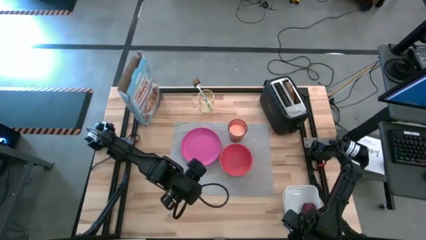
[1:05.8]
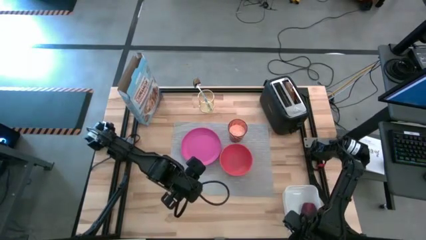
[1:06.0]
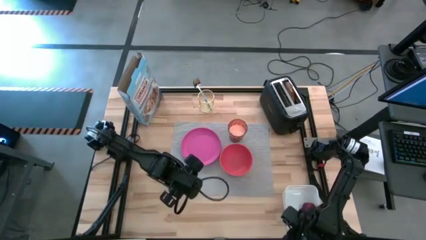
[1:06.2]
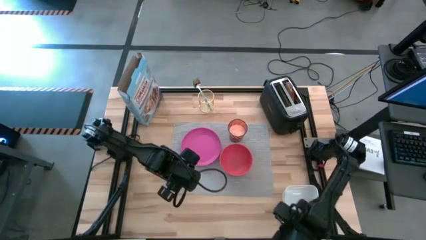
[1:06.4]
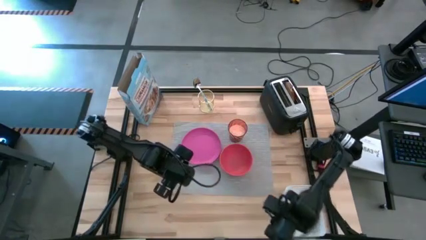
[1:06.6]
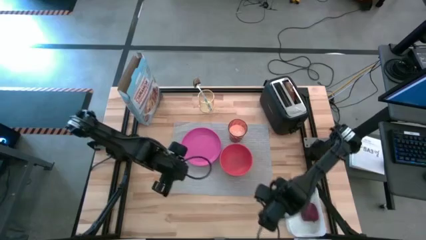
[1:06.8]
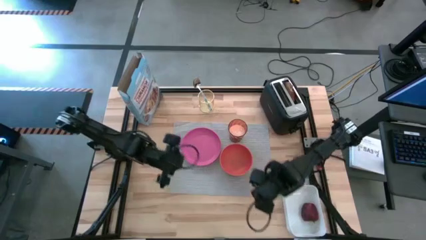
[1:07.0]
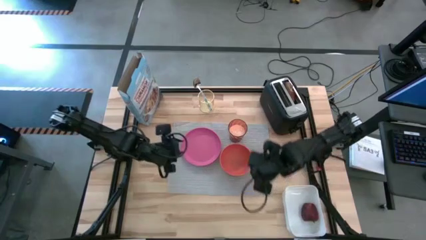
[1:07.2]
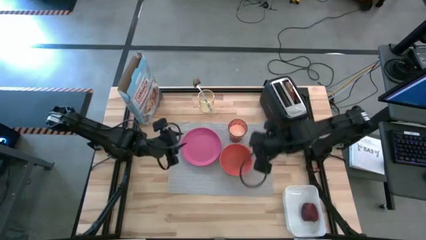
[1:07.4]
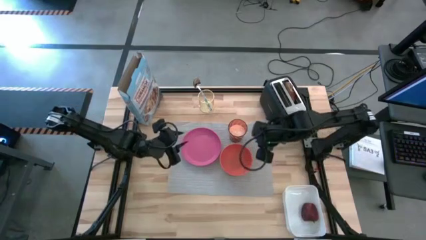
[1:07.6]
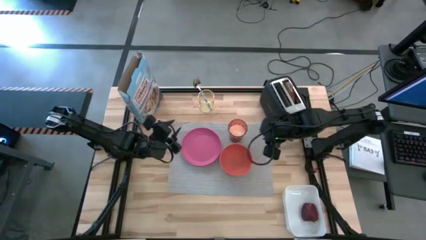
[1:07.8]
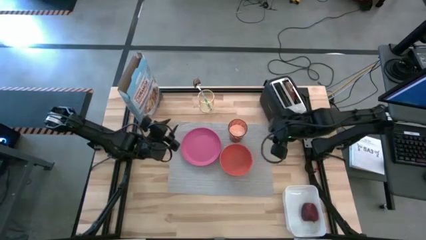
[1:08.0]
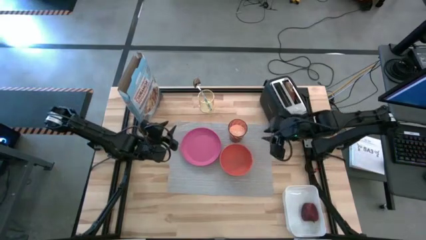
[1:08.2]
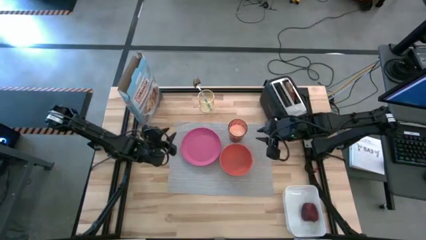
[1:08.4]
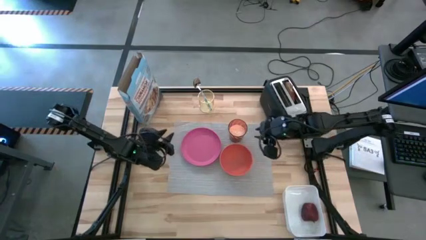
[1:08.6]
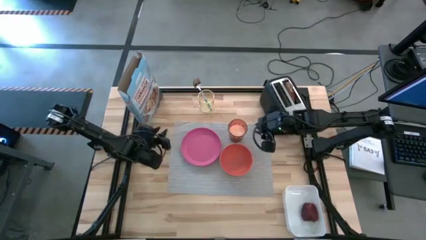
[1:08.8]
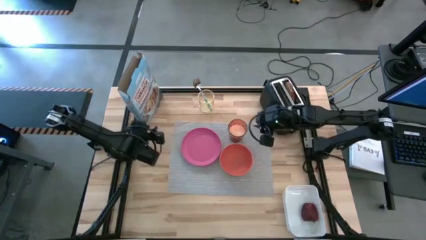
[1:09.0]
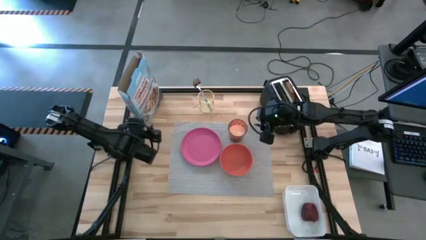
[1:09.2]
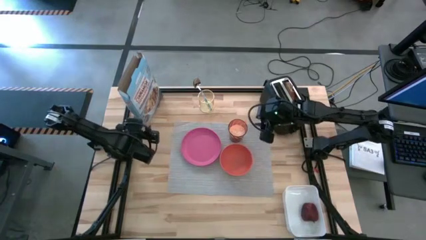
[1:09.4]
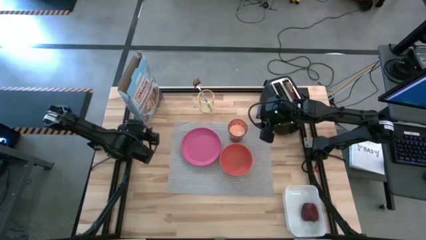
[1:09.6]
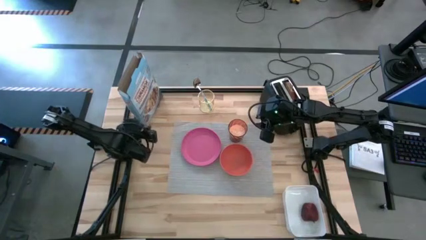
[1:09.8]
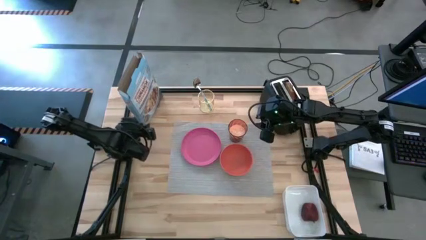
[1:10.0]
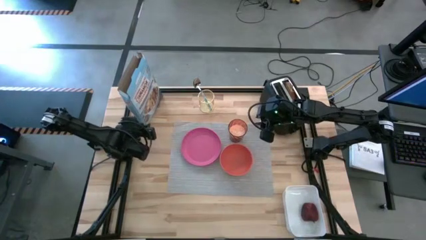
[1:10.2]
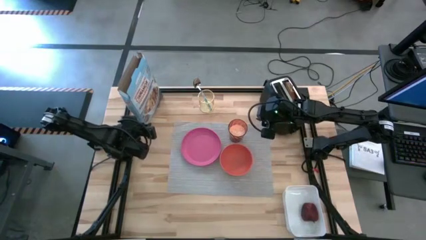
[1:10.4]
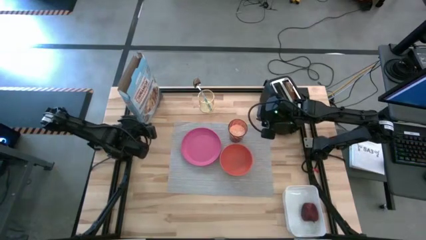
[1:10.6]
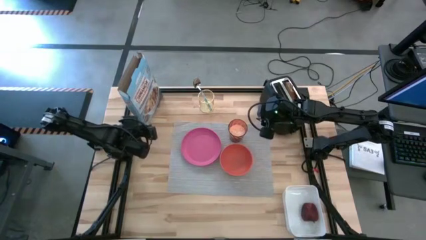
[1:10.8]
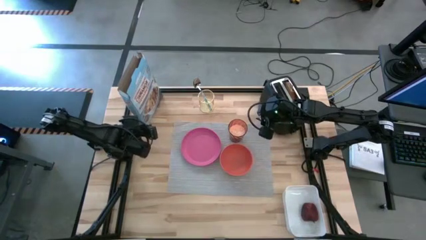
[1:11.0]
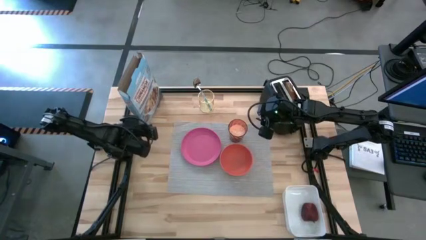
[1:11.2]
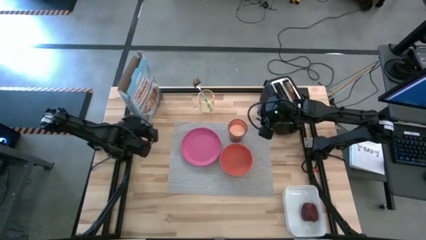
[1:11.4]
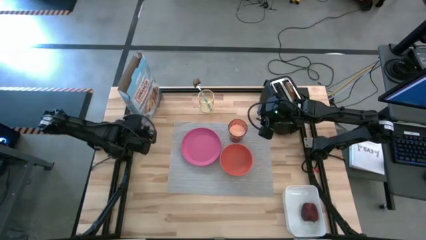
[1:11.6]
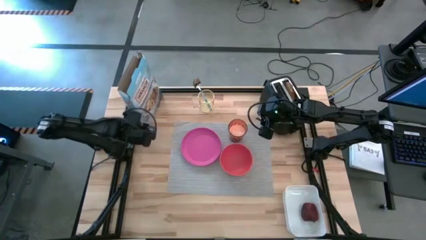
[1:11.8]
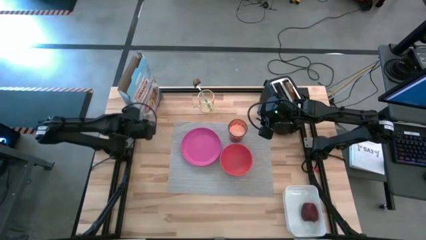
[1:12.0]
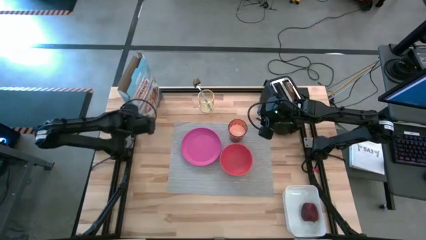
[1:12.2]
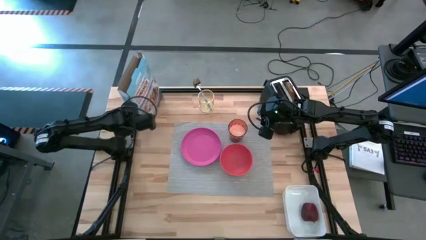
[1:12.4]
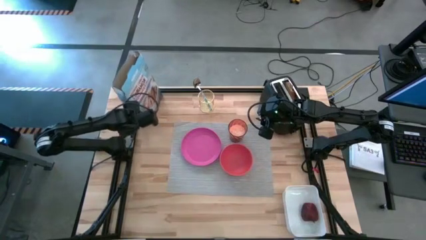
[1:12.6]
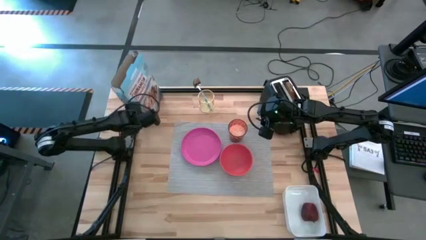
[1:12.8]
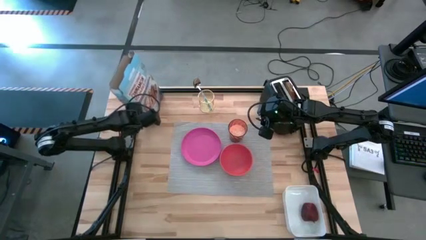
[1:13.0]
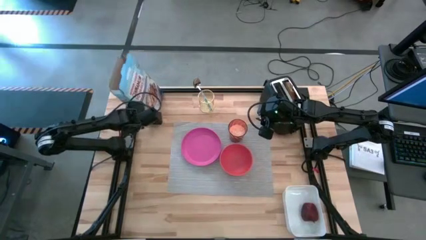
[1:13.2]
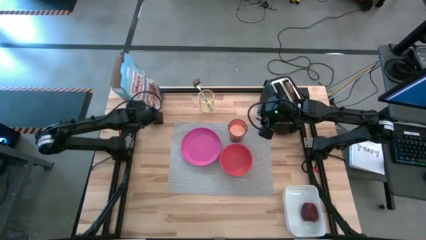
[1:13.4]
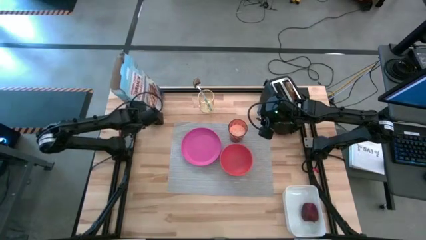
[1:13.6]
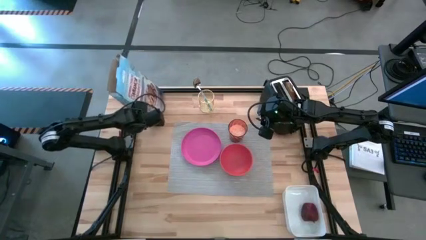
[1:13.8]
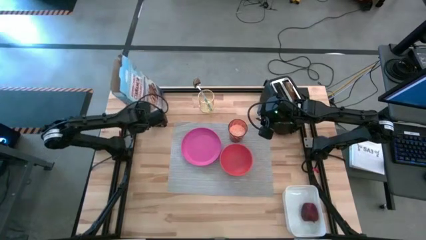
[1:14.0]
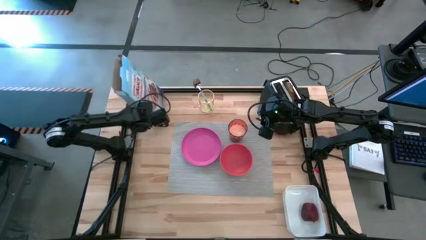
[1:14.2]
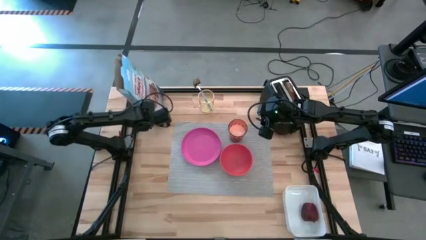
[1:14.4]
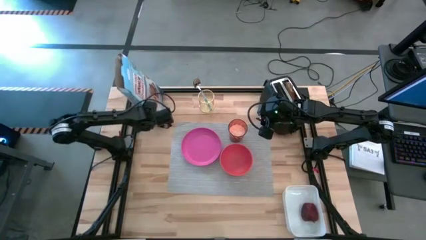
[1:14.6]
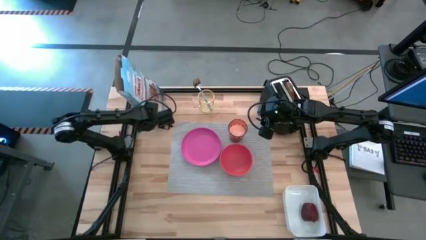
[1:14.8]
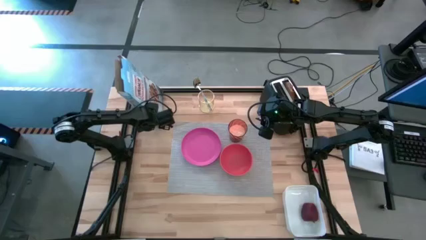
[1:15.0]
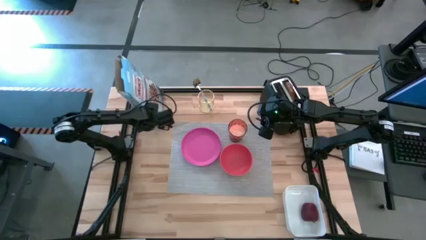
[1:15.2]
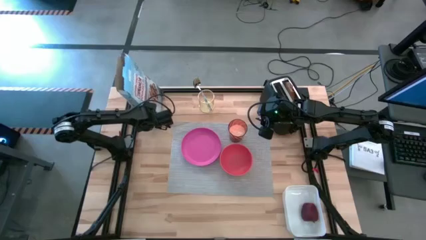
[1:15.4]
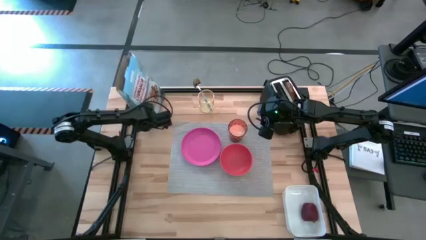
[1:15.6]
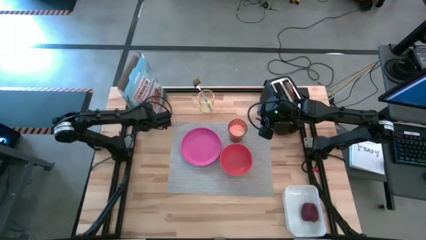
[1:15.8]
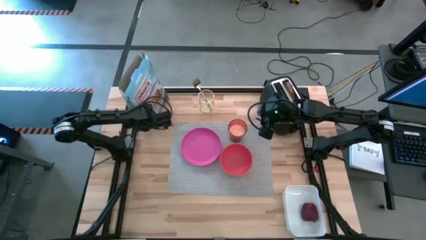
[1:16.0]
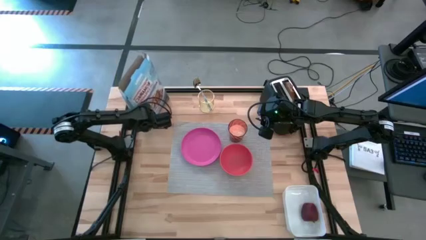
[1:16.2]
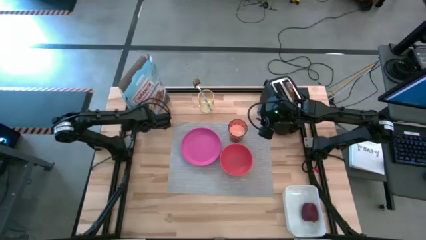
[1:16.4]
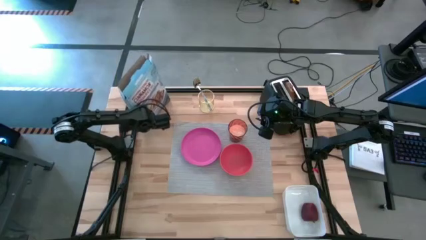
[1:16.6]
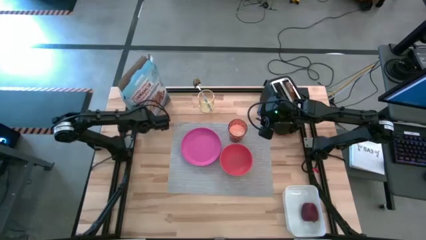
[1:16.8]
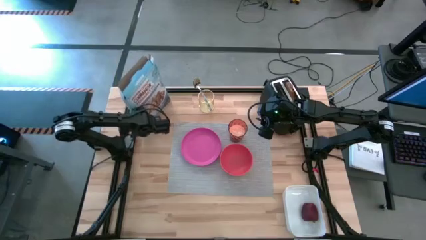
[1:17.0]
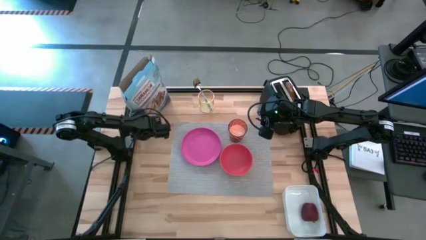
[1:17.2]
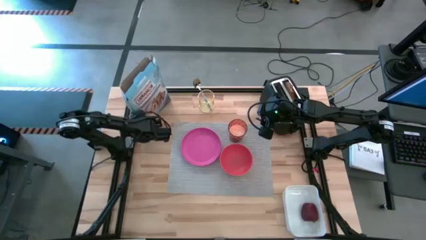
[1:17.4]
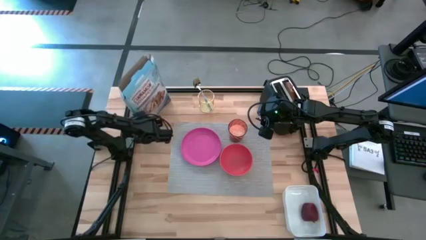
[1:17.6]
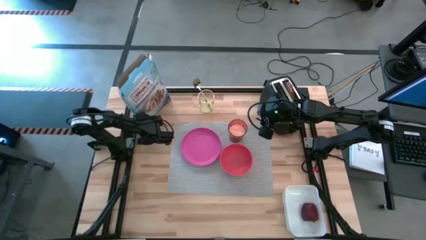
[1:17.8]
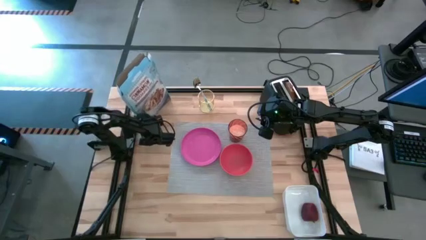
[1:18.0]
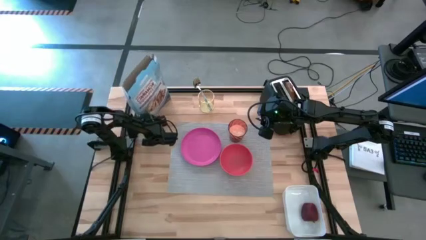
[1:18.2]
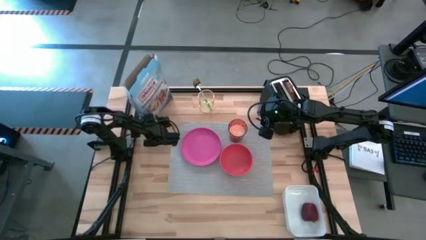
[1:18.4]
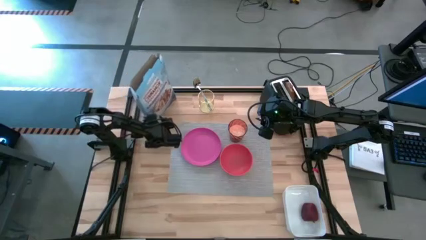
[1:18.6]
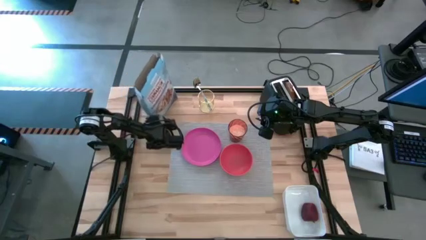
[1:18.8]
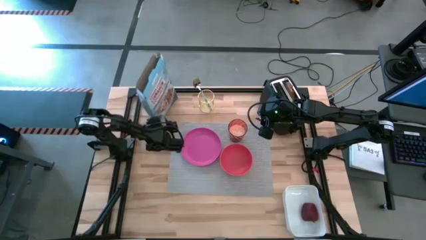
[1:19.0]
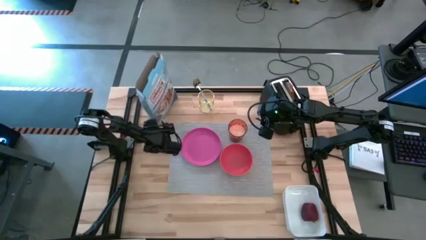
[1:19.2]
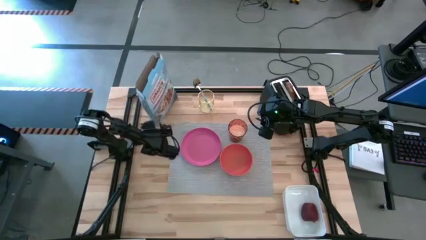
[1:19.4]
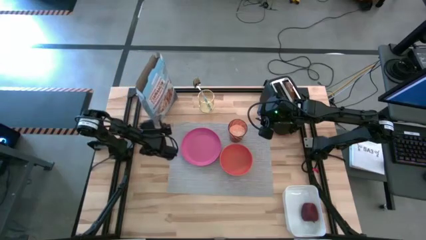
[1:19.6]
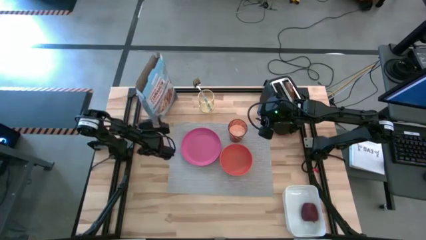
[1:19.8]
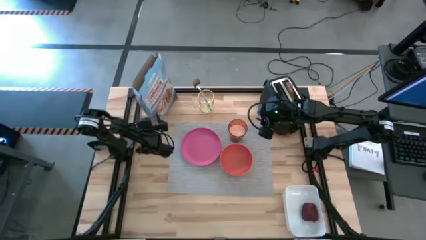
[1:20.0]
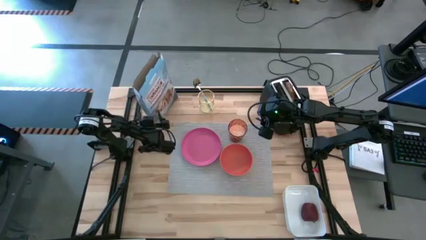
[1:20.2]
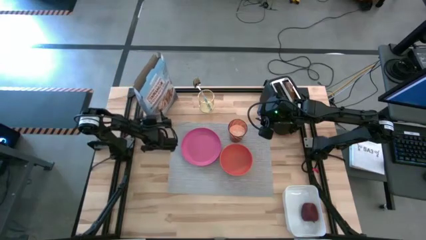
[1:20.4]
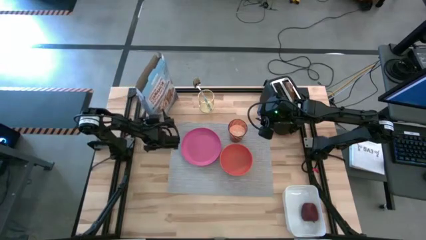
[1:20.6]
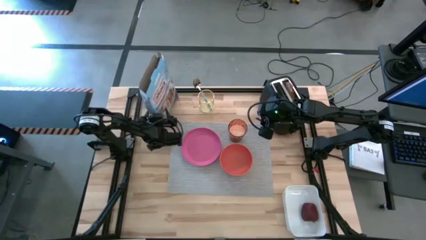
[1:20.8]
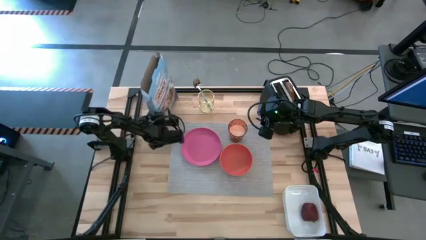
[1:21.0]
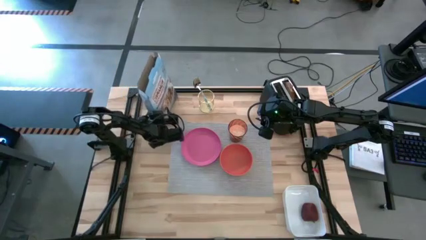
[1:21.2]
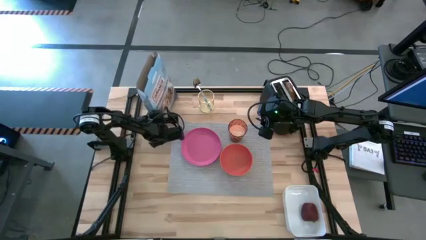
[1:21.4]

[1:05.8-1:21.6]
Task: Arrange a breakfast setting
Pour the cereals from the cereal box in the orange bowl

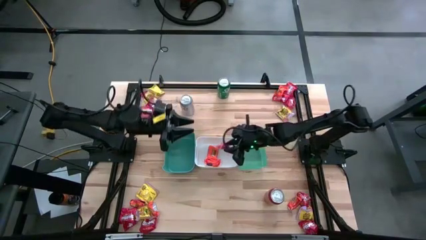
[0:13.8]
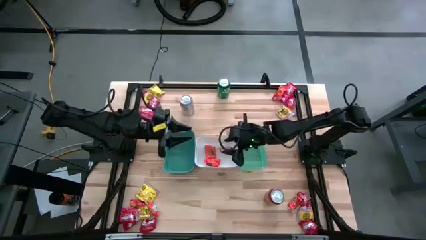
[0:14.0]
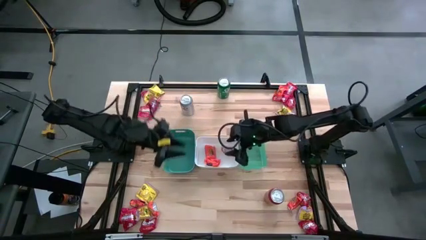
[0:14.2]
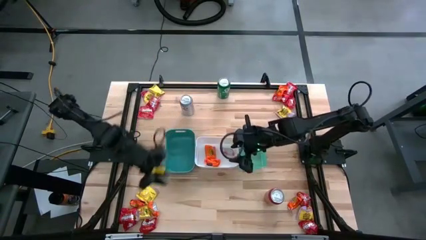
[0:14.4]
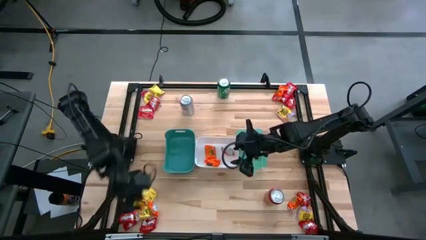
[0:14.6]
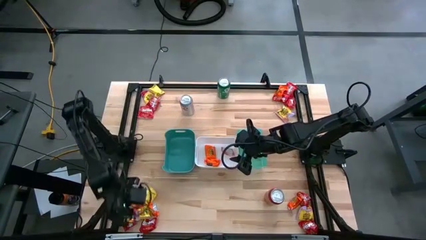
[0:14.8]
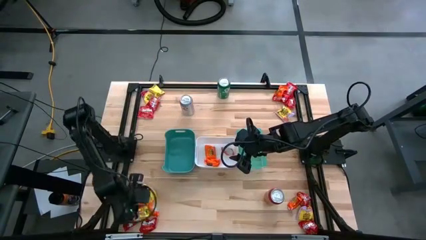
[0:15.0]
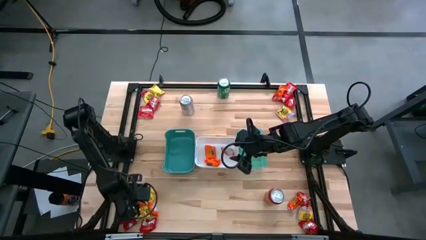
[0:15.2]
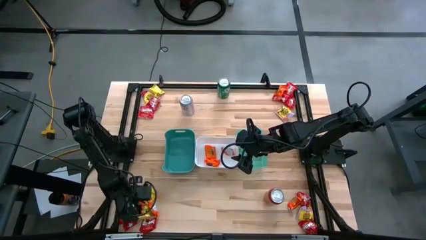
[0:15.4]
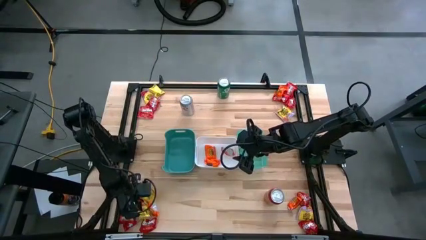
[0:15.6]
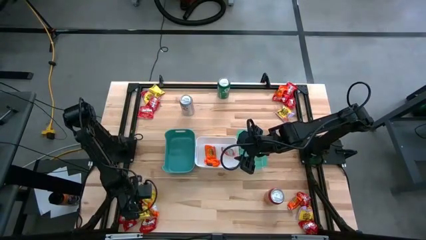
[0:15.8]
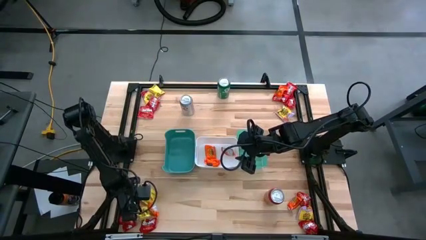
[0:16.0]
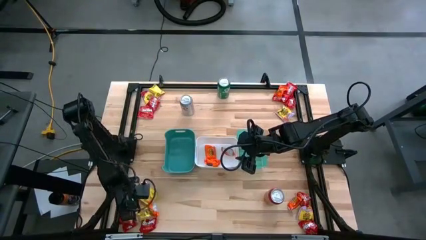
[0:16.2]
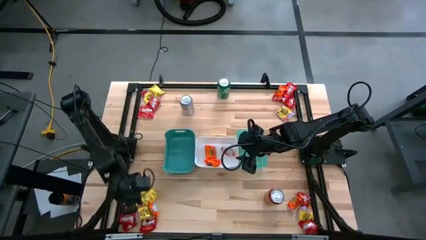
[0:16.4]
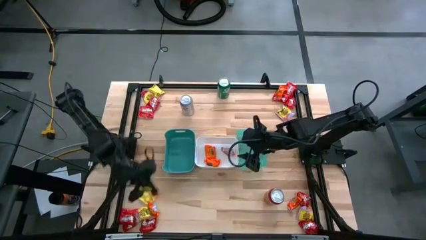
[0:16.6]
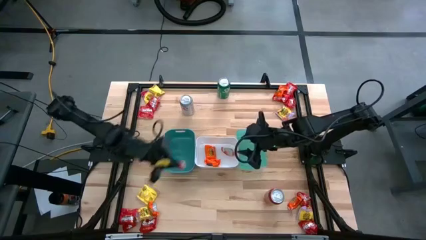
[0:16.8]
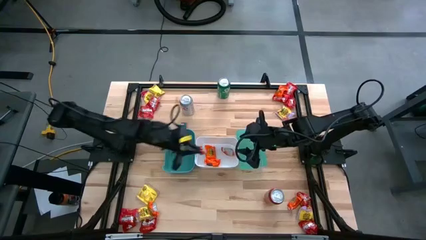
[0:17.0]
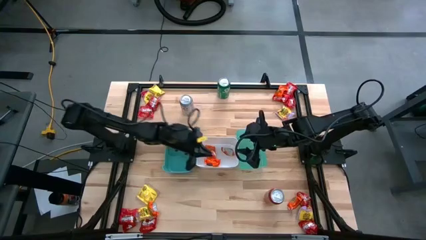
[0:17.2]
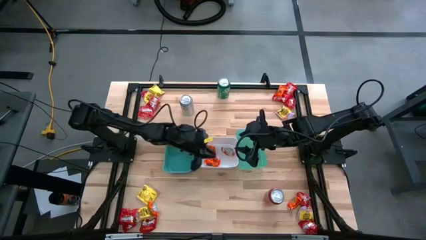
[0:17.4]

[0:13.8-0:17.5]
Task: Sort candy
Put the orange chocolate into the white bin
